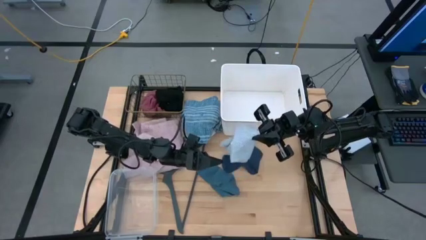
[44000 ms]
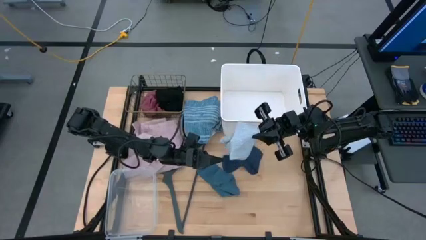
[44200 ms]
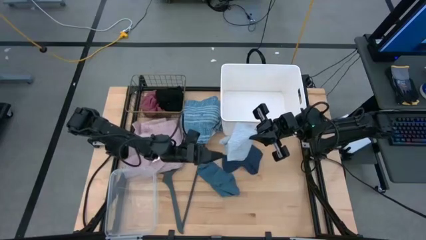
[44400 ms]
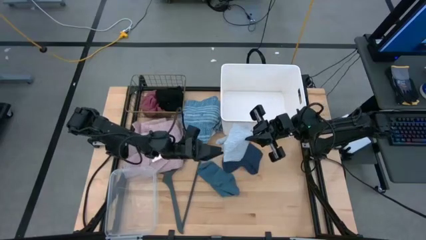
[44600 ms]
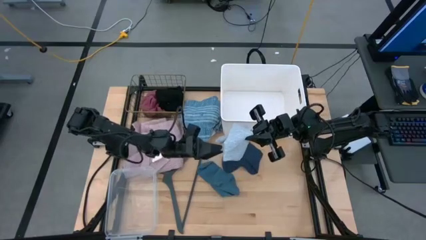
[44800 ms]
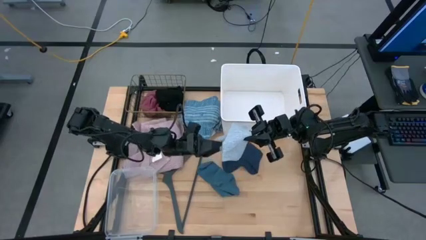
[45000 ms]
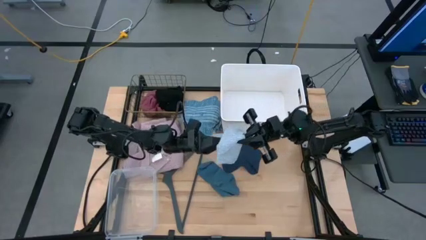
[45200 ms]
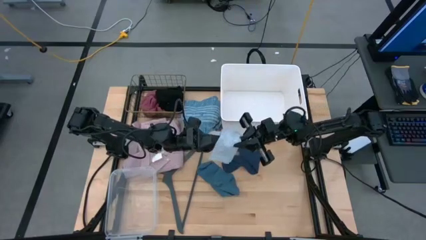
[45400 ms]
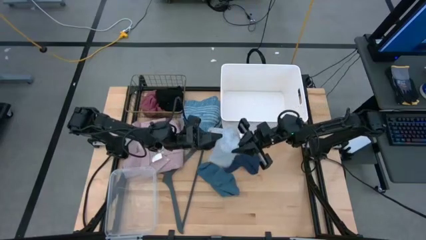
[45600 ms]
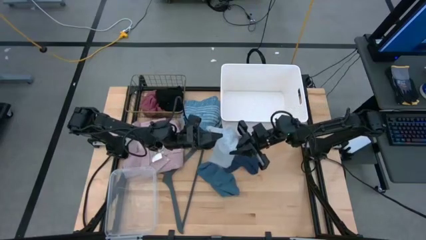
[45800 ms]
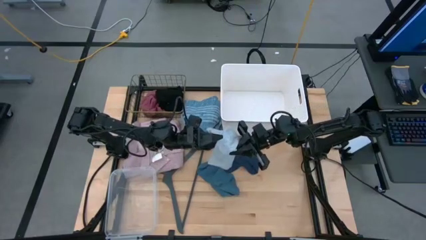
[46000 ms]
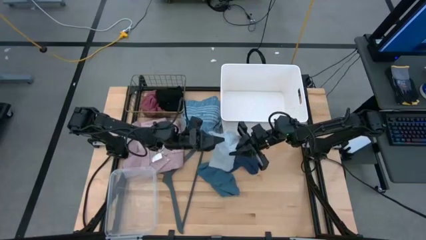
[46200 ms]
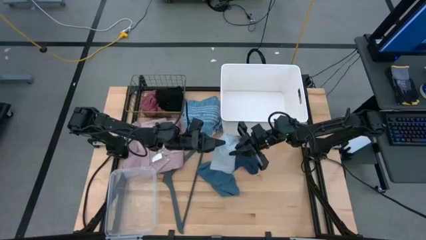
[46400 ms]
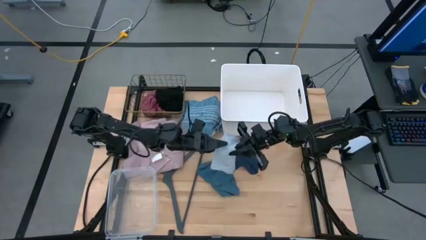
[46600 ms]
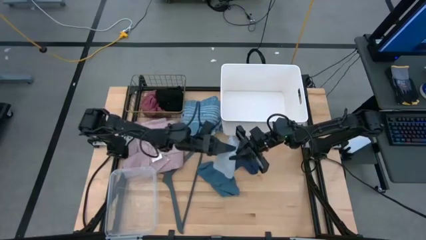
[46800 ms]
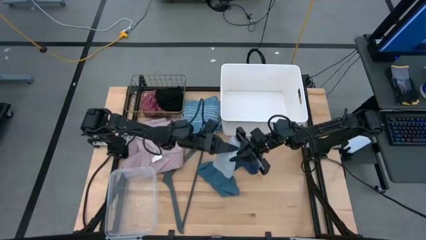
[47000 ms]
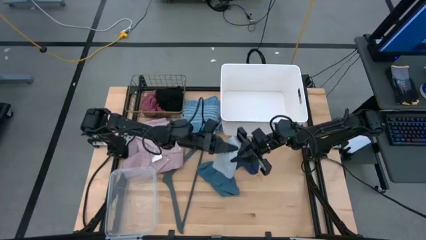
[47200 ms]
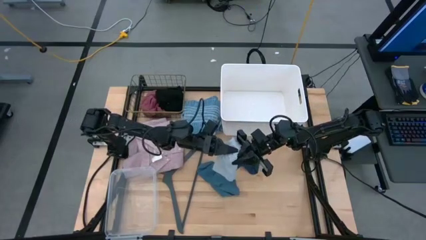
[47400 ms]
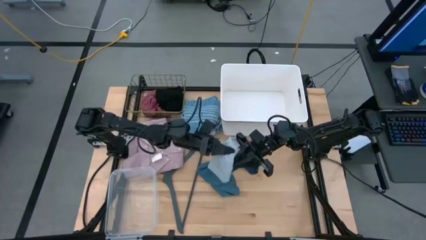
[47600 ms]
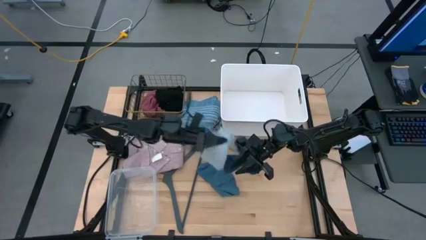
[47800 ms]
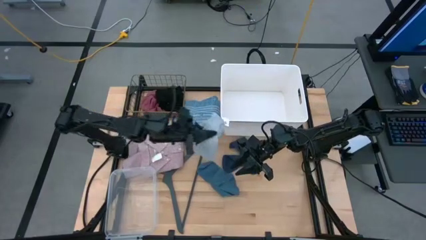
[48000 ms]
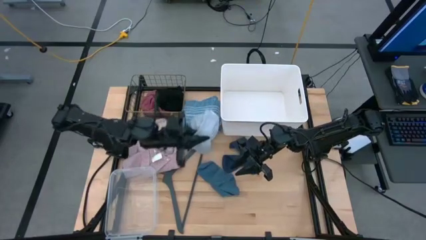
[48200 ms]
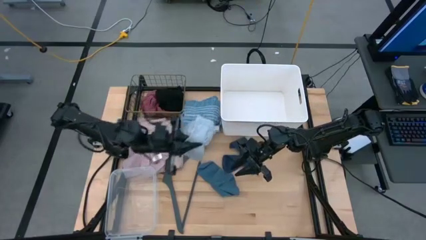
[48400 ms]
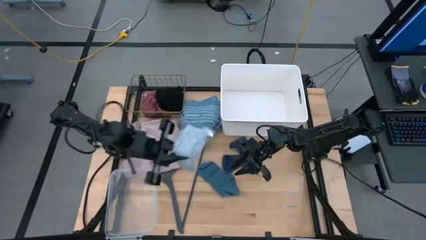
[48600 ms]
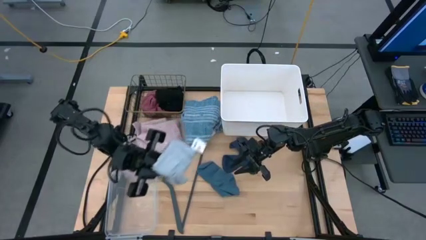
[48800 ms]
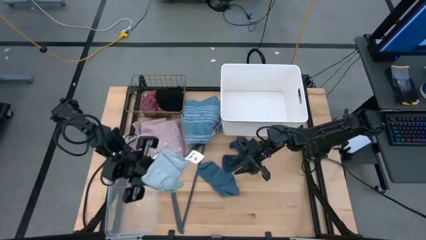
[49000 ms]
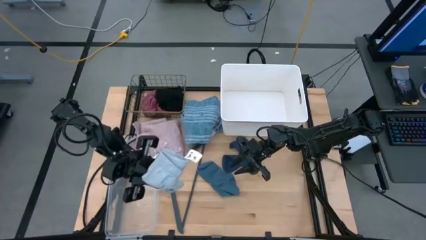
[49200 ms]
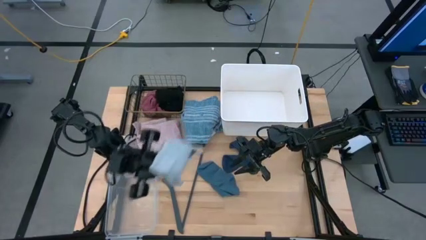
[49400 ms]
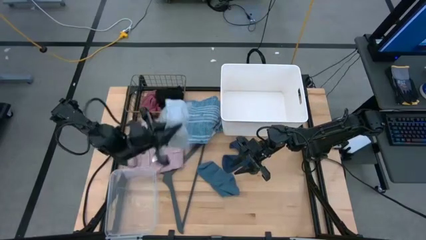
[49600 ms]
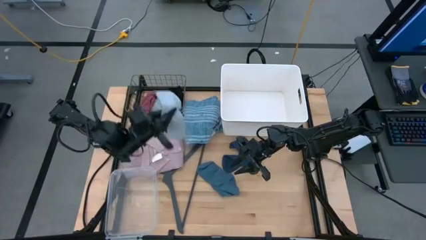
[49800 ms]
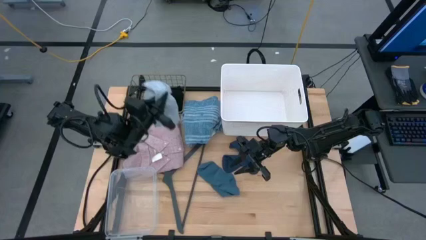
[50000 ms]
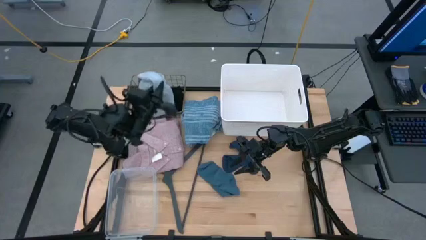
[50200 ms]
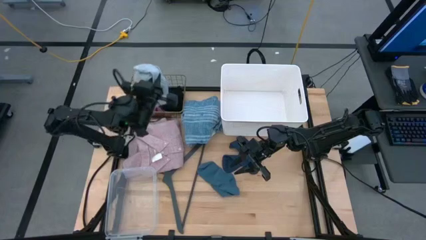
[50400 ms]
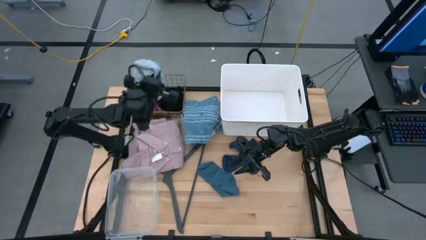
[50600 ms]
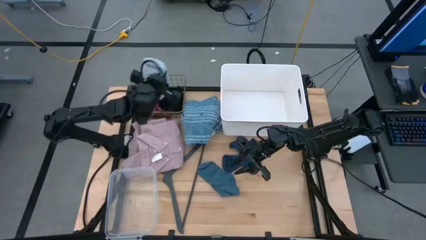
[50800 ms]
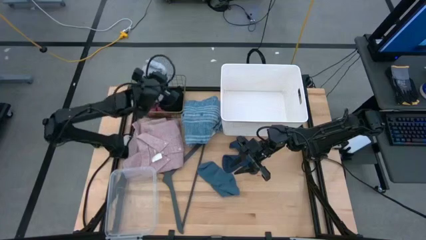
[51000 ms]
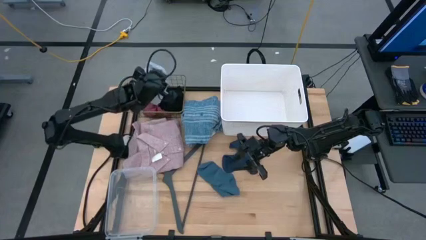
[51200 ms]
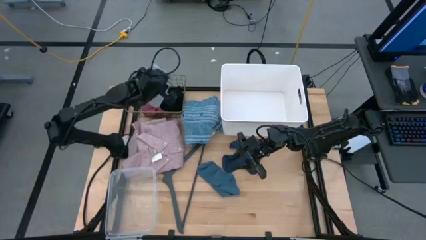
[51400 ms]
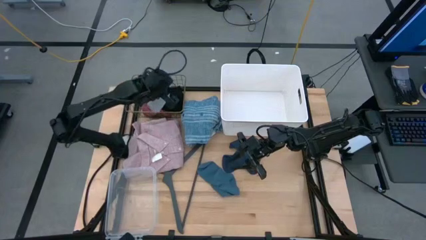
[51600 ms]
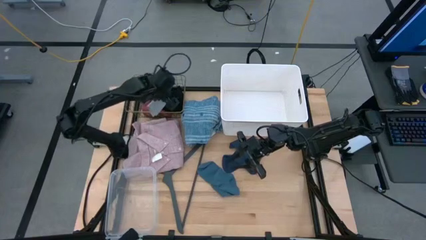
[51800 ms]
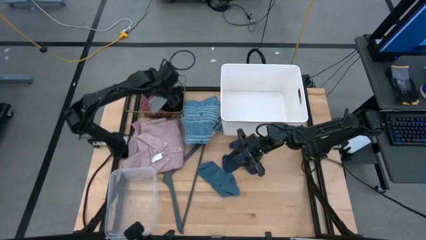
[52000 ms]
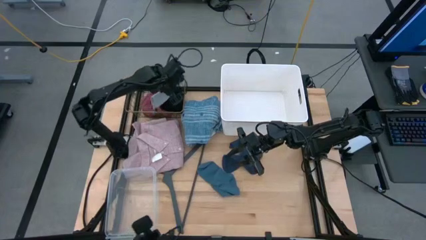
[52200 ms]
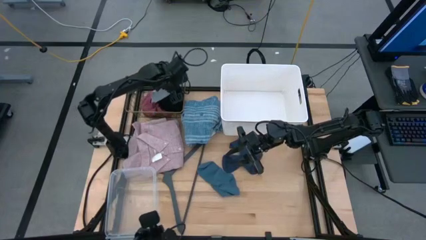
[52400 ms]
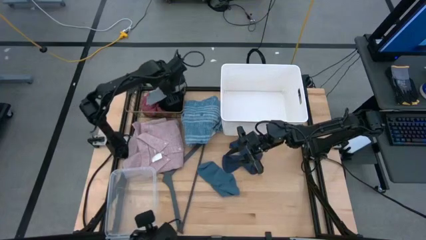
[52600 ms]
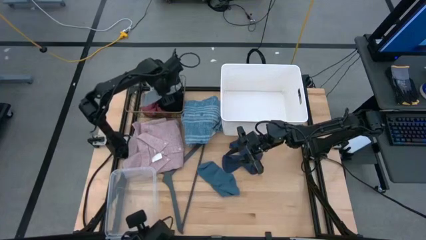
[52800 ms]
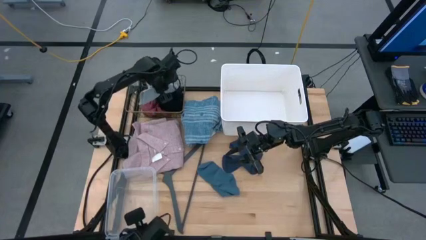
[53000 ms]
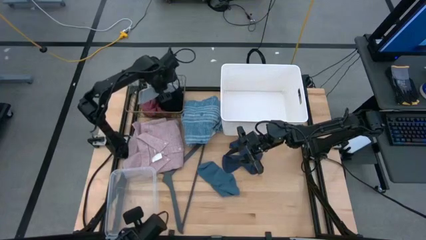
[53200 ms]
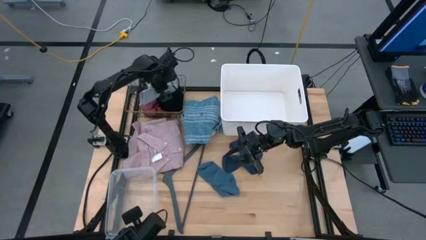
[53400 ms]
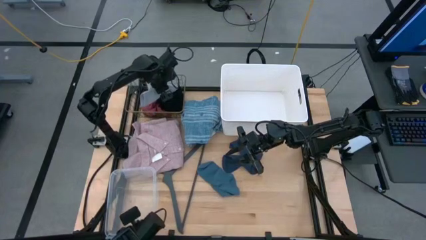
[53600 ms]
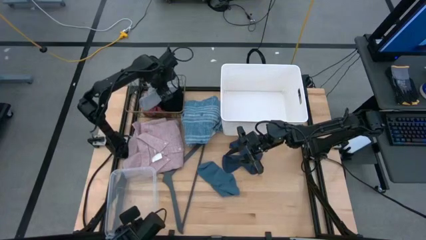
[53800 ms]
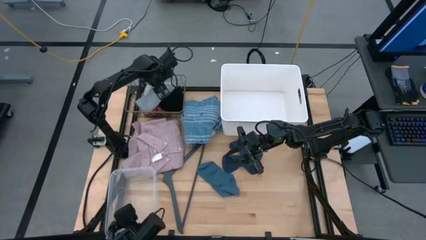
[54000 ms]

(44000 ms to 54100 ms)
Task: Pick & Place Cloths
Put the gray undergarment into the gold wire basket
